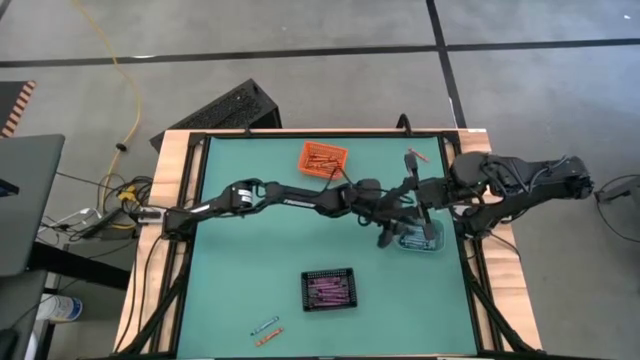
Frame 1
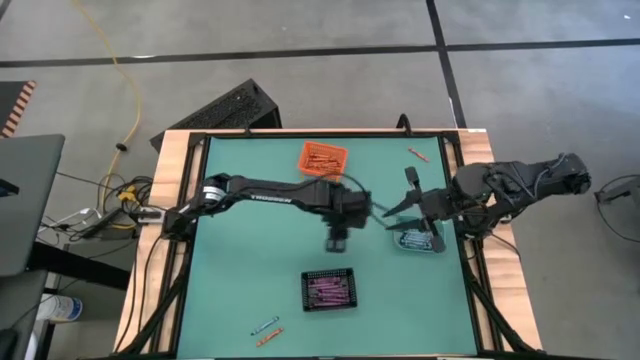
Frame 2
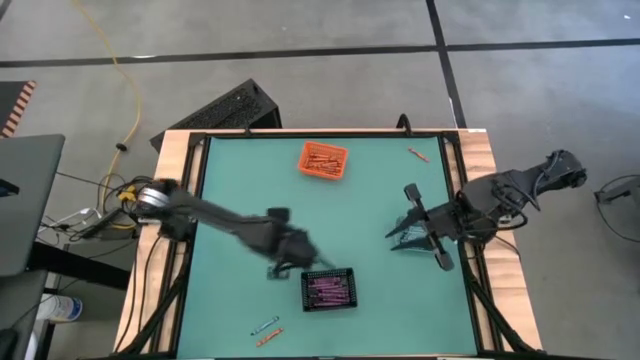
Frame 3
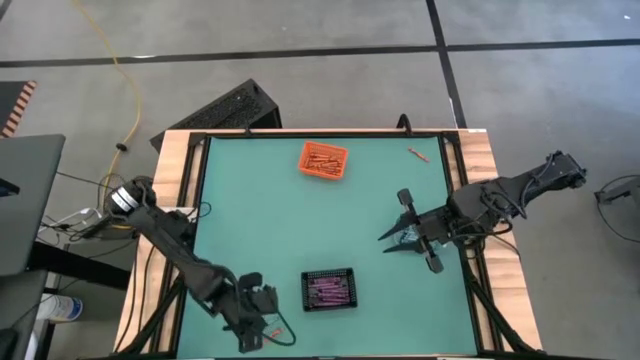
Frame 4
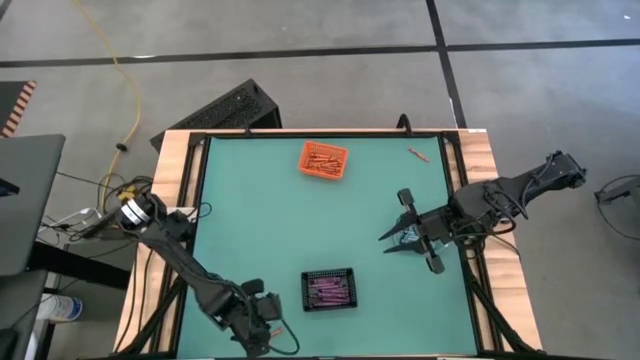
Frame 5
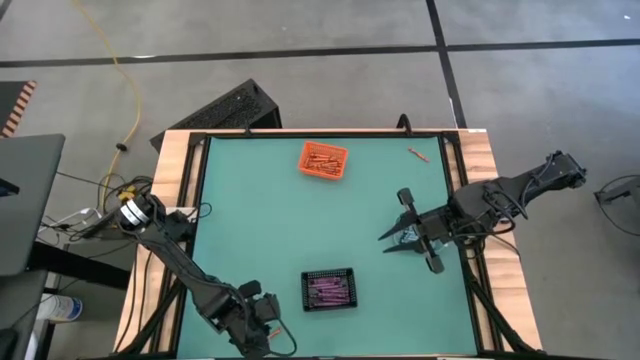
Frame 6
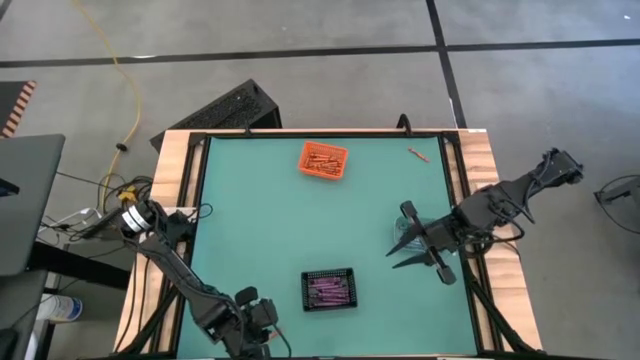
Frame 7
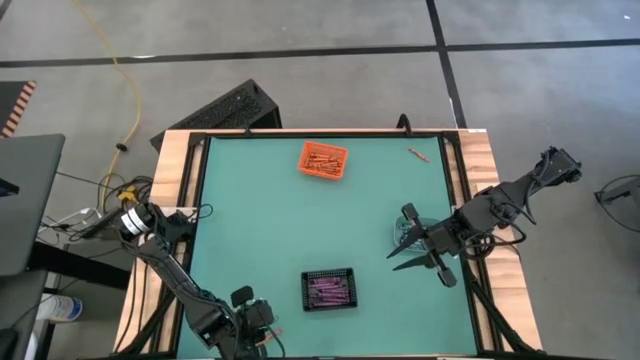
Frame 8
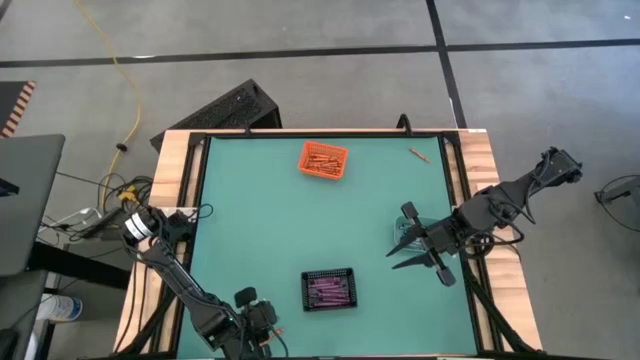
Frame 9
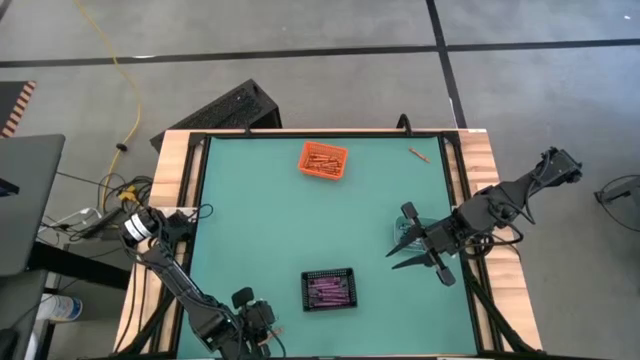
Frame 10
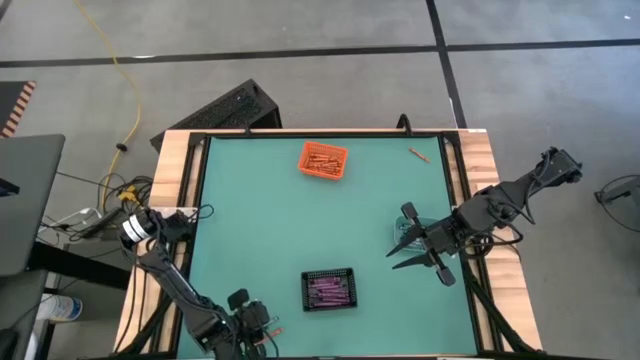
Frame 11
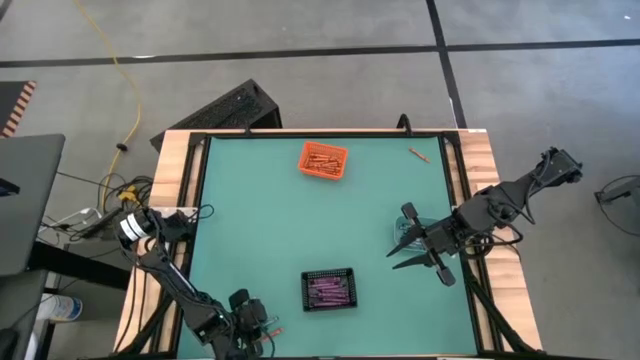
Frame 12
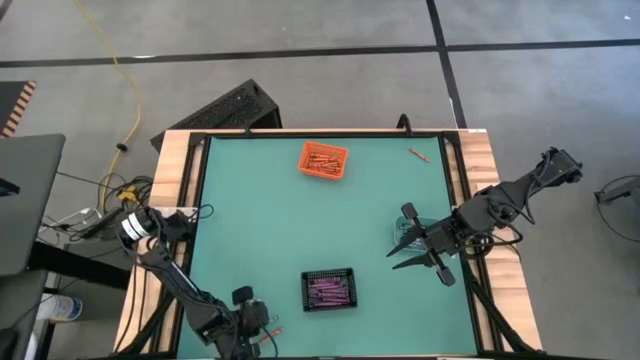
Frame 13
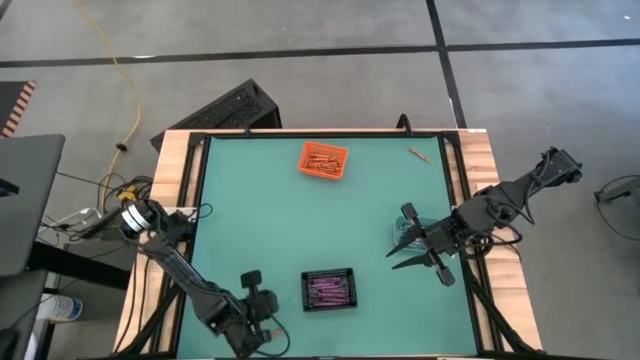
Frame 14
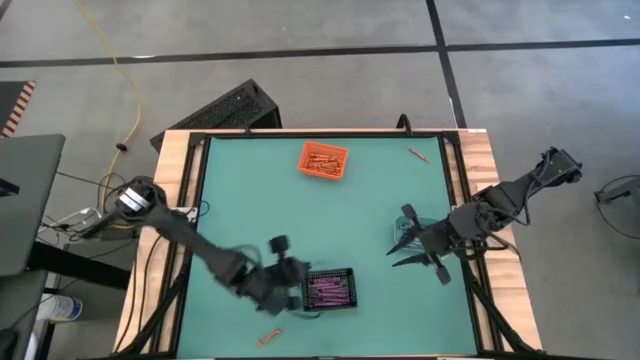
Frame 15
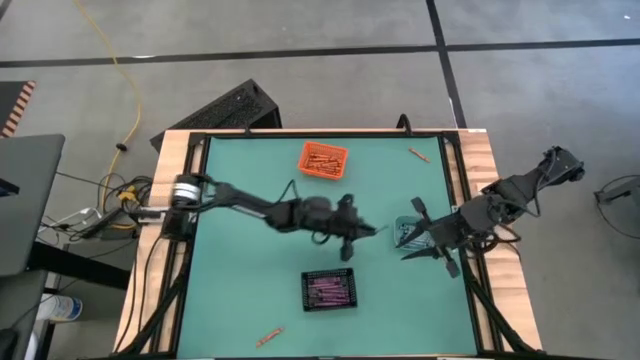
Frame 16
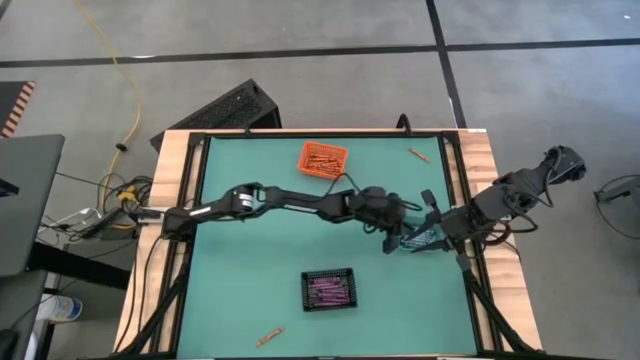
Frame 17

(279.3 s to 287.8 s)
Task: Sort crayons
Put the blue crayon into the blue bin

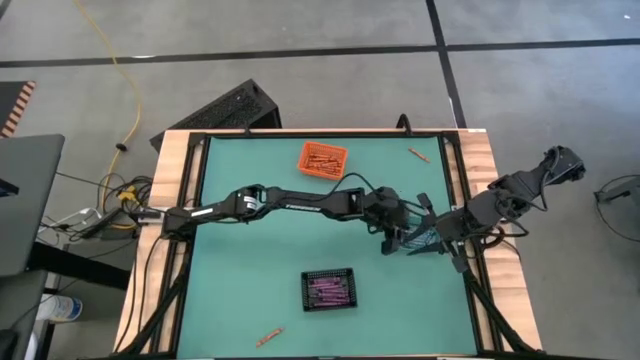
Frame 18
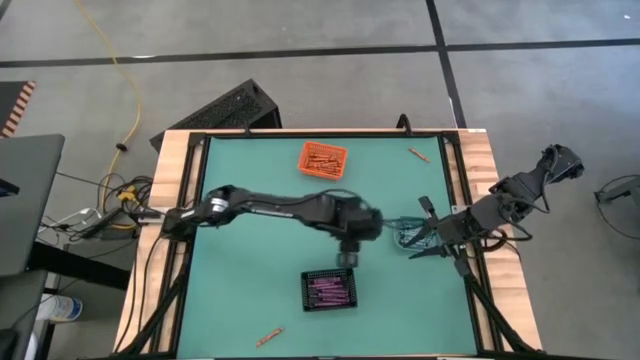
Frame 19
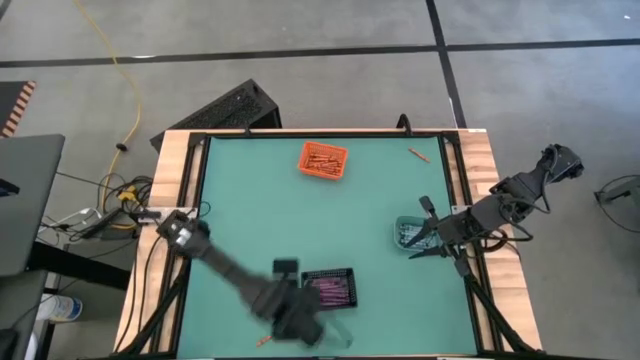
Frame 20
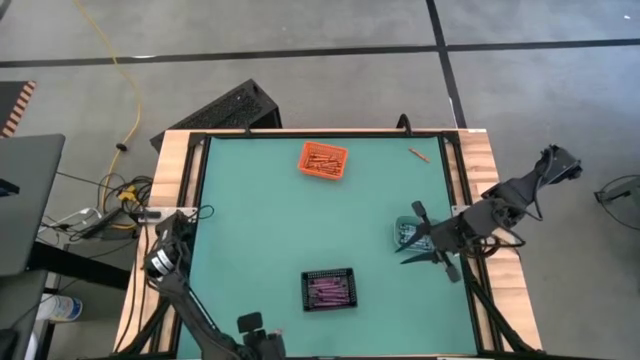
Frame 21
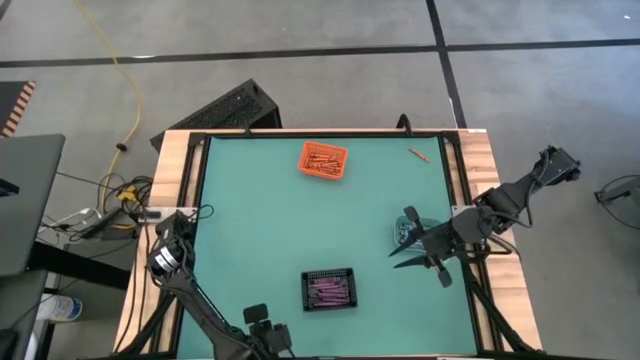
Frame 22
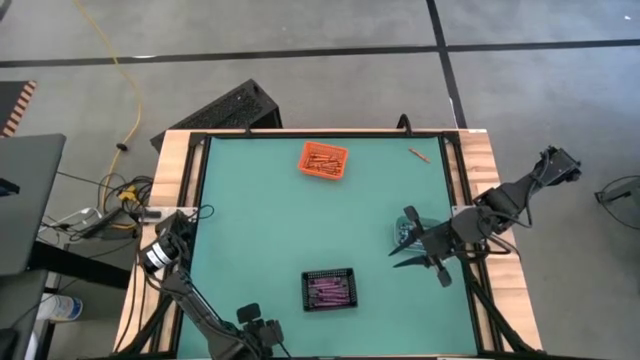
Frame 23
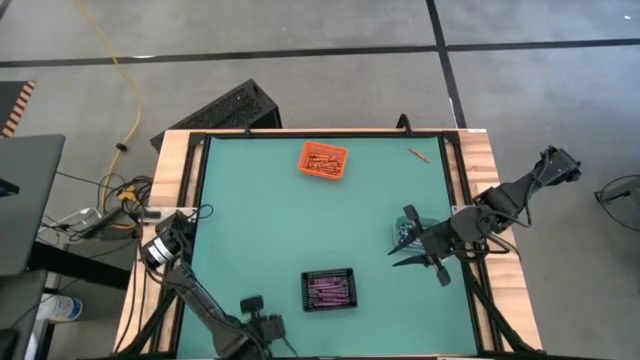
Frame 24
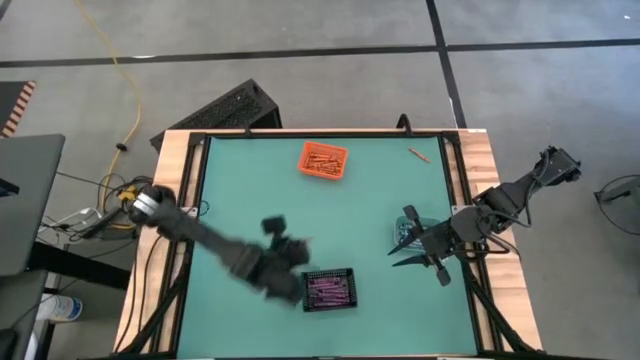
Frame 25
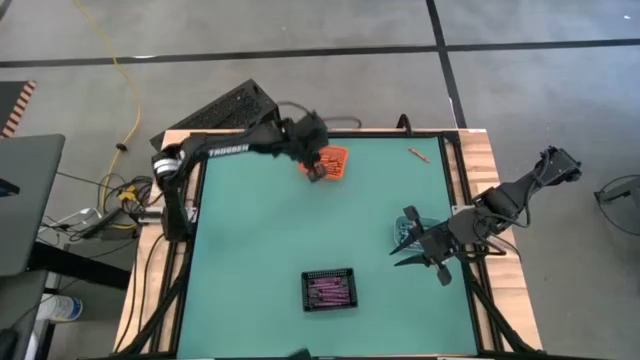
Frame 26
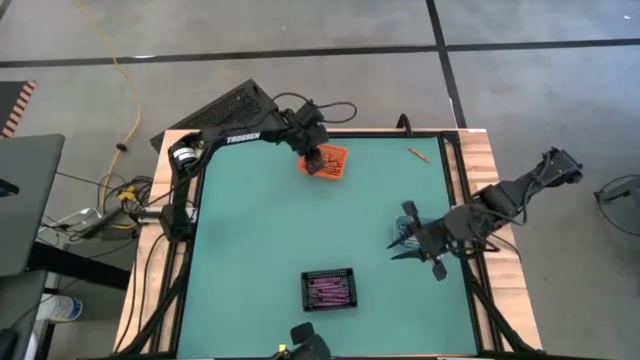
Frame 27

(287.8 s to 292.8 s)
Put the orange crayon into the orange bin

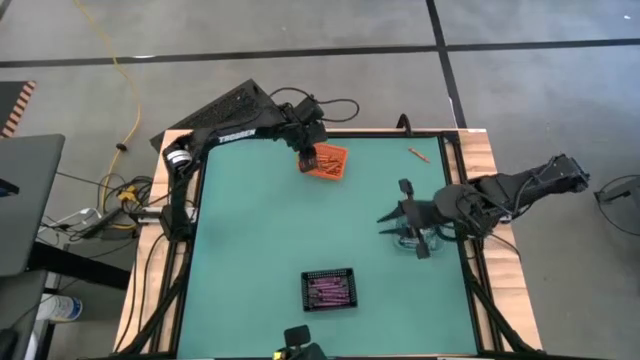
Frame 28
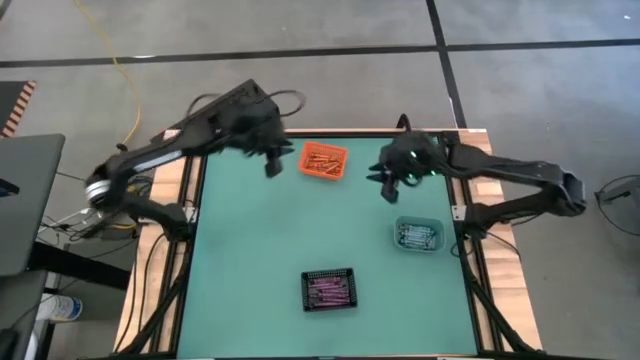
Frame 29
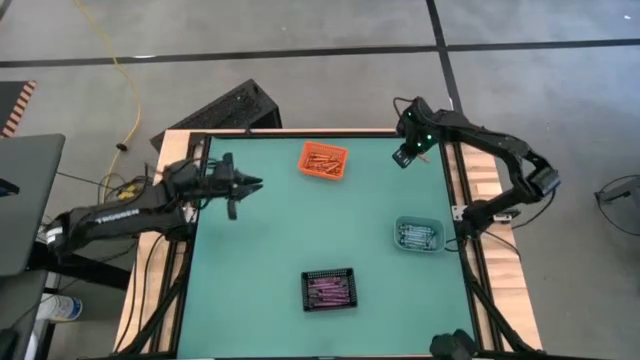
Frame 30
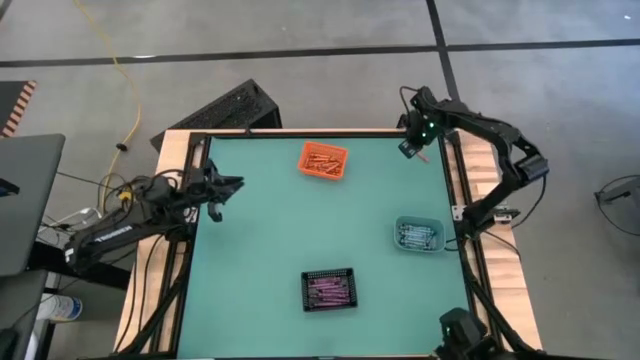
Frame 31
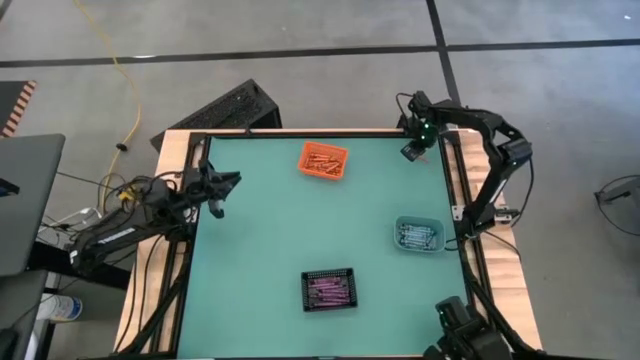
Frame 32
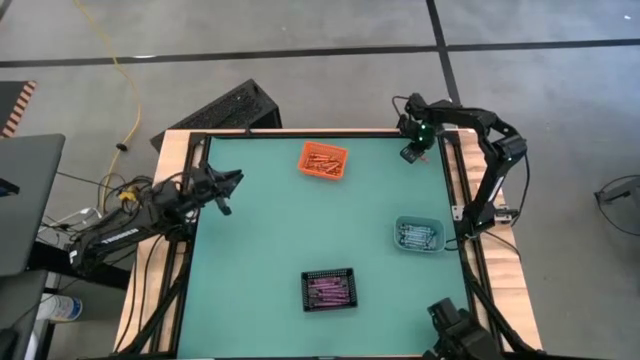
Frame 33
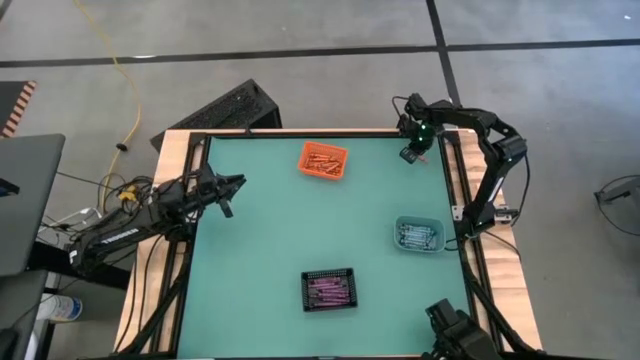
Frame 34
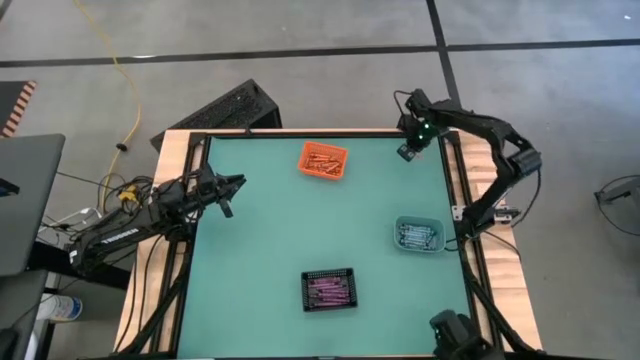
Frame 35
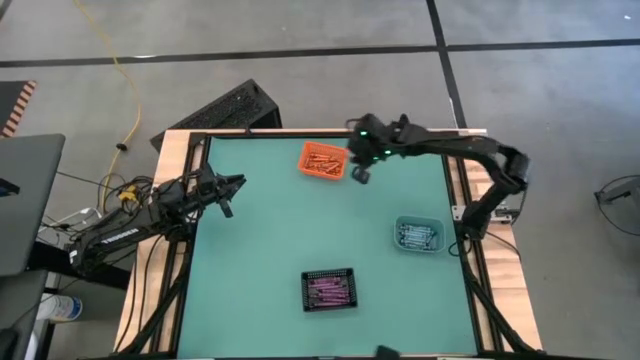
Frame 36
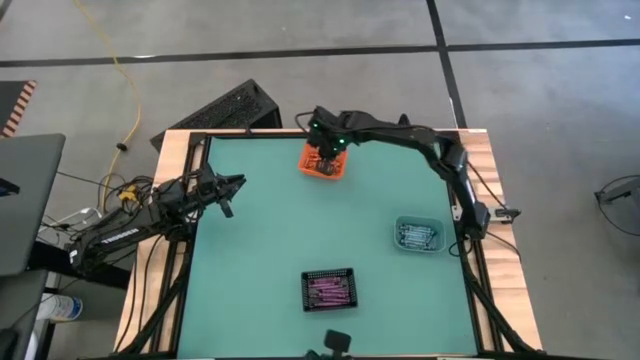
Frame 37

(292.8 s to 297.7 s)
Put the orange crayon into the orange bin

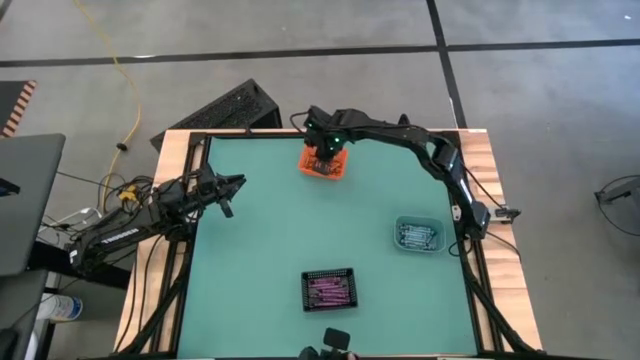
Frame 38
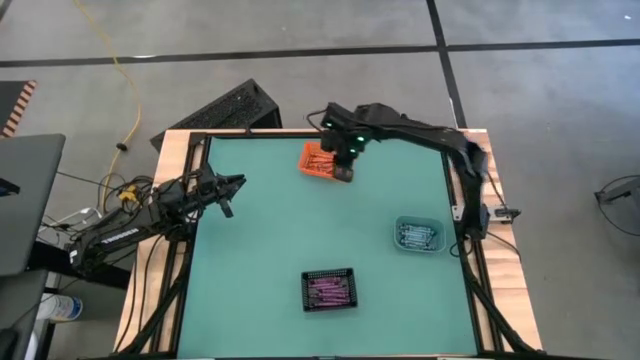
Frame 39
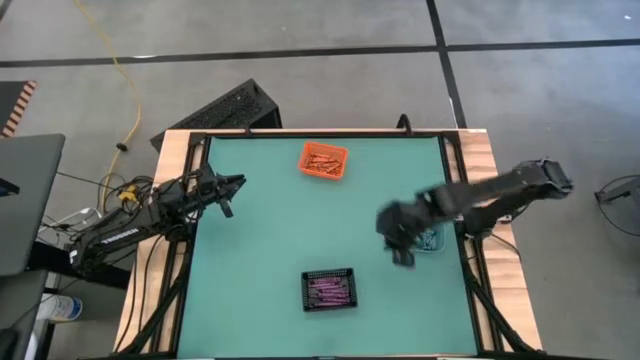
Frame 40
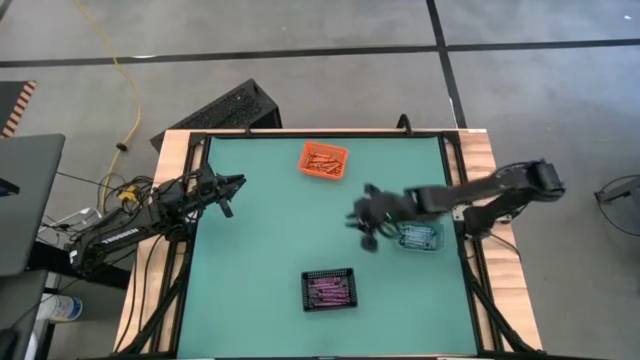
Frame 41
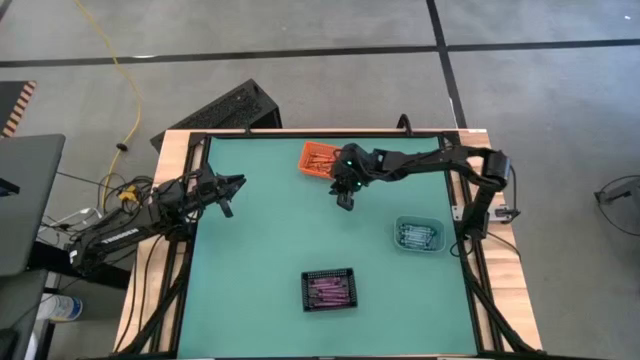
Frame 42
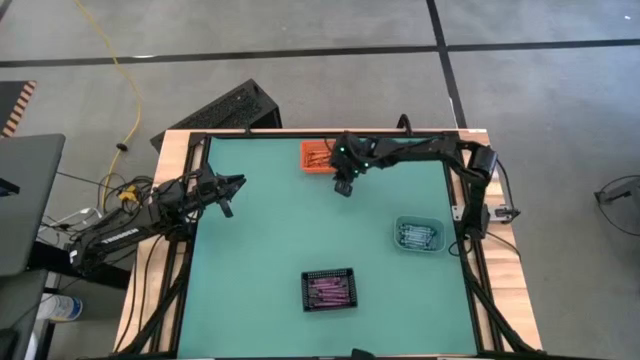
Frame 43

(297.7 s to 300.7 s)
Adjust the orange bin
